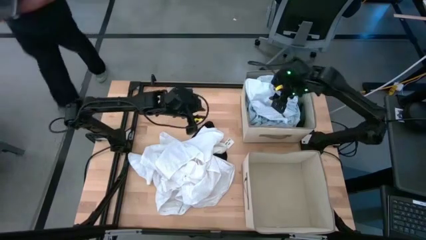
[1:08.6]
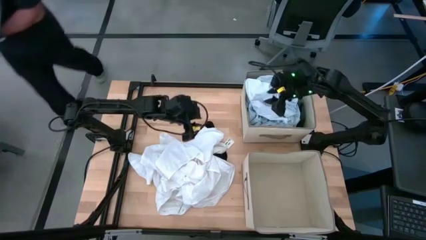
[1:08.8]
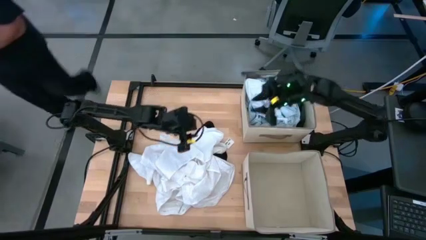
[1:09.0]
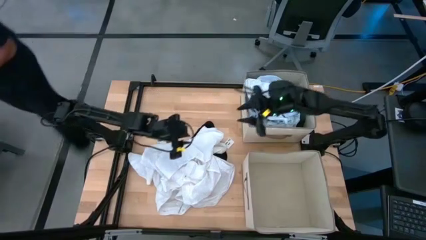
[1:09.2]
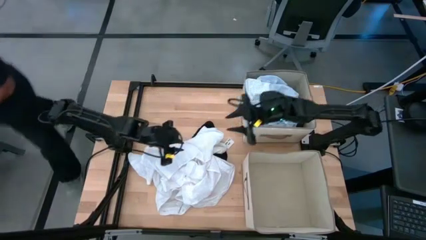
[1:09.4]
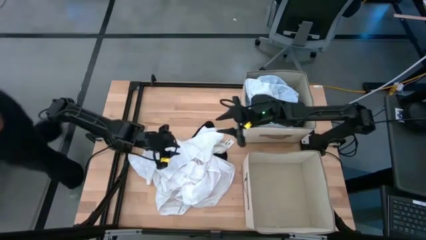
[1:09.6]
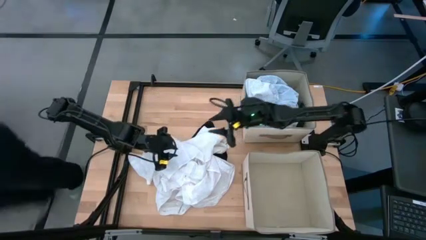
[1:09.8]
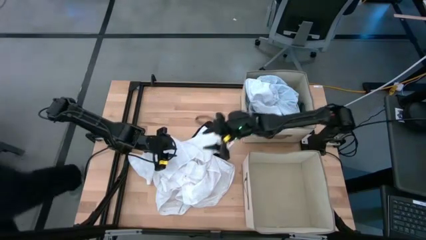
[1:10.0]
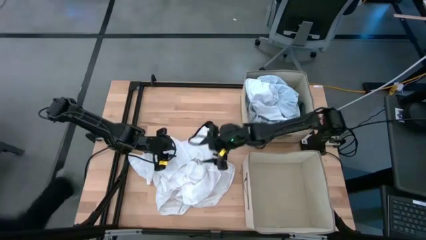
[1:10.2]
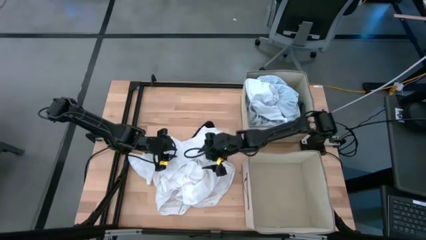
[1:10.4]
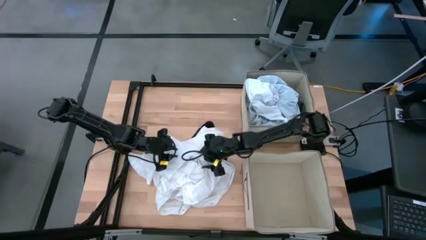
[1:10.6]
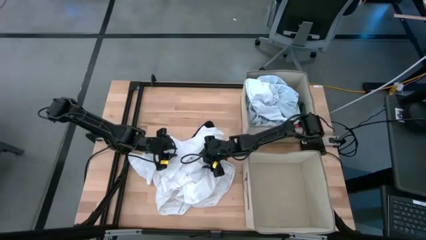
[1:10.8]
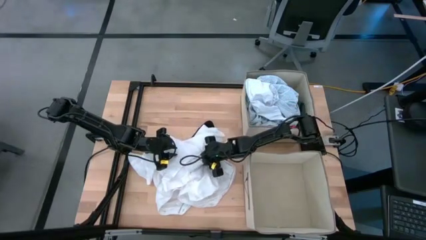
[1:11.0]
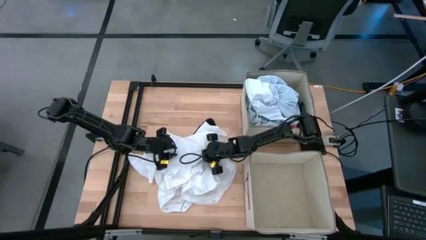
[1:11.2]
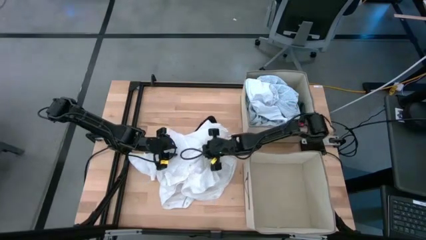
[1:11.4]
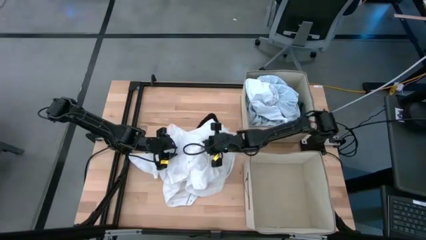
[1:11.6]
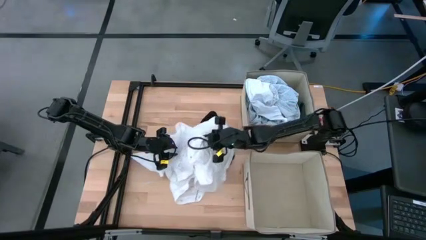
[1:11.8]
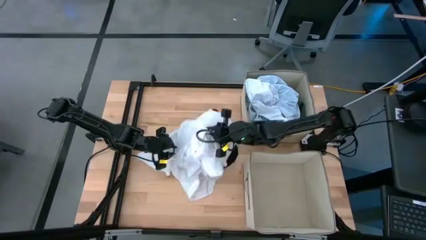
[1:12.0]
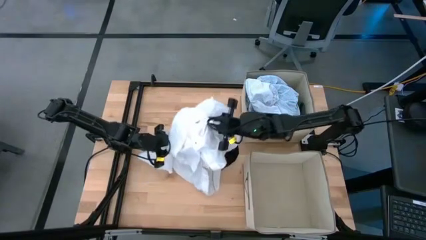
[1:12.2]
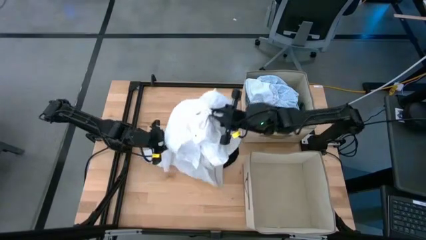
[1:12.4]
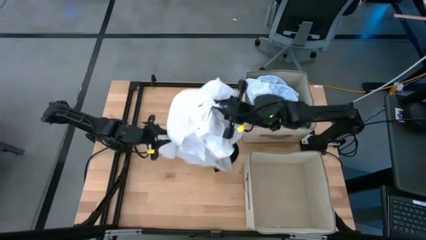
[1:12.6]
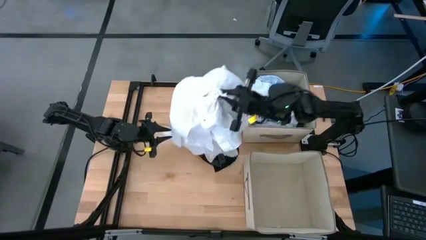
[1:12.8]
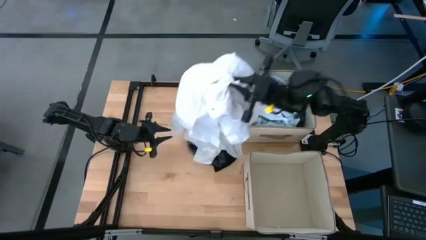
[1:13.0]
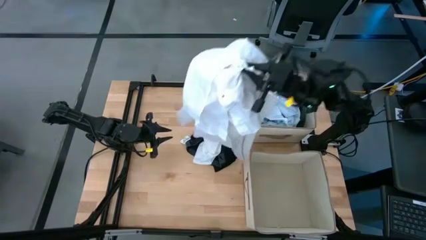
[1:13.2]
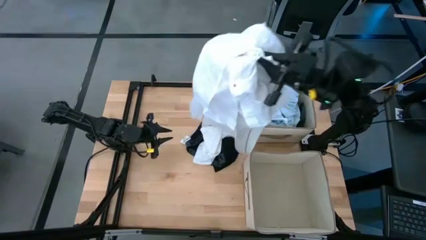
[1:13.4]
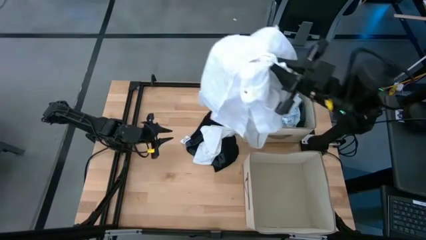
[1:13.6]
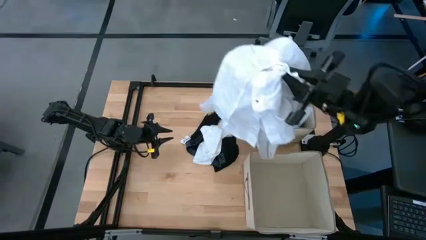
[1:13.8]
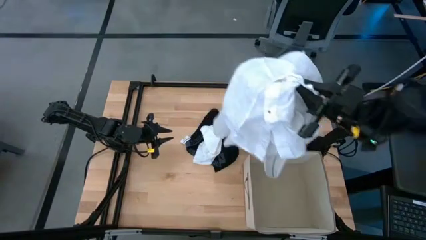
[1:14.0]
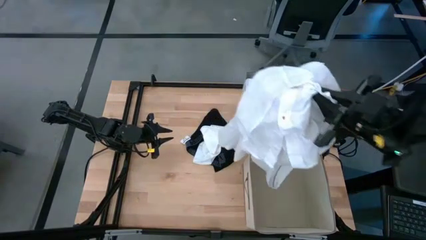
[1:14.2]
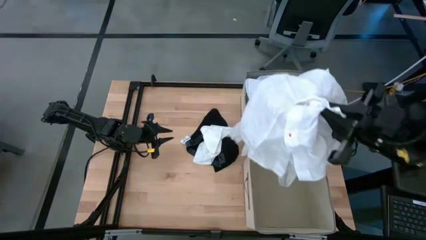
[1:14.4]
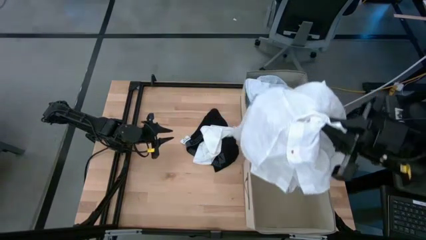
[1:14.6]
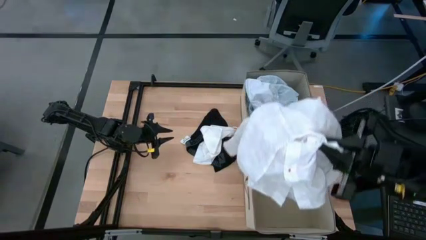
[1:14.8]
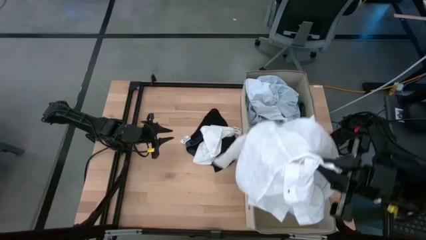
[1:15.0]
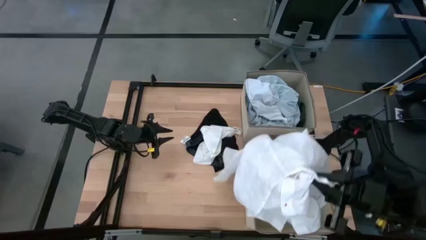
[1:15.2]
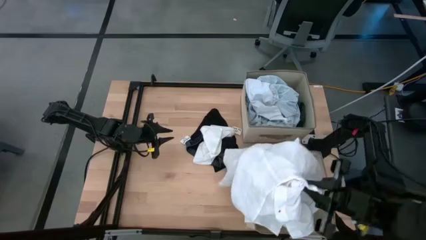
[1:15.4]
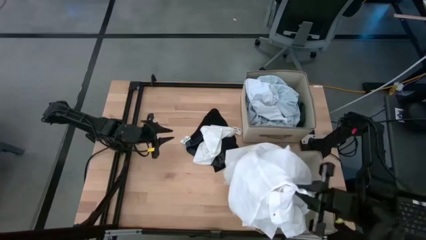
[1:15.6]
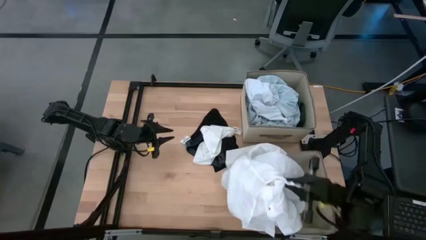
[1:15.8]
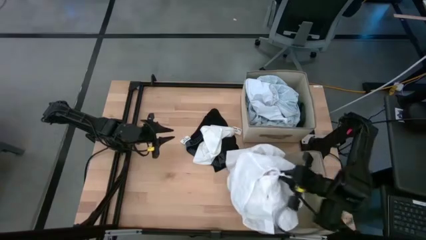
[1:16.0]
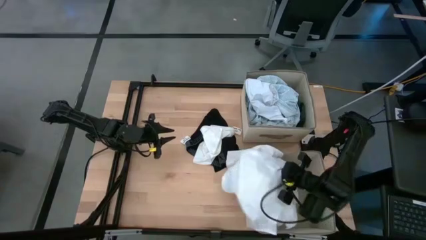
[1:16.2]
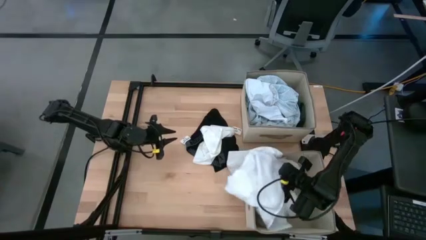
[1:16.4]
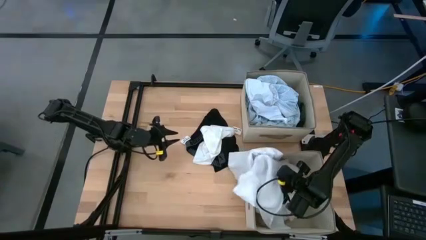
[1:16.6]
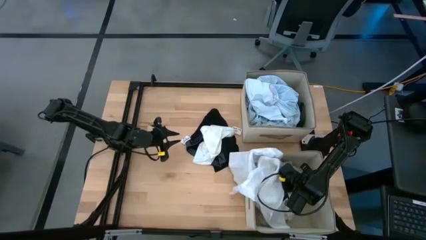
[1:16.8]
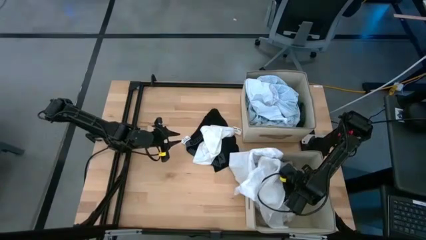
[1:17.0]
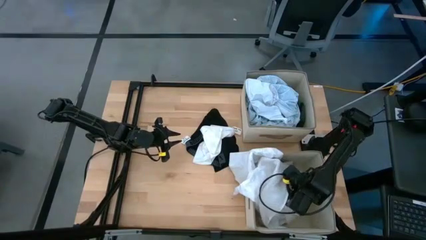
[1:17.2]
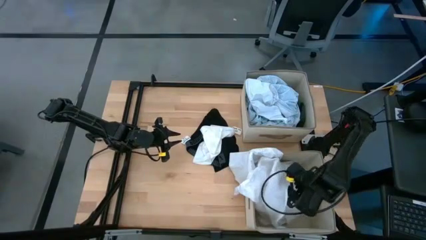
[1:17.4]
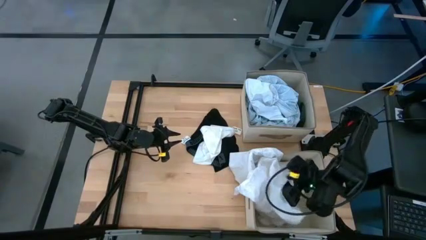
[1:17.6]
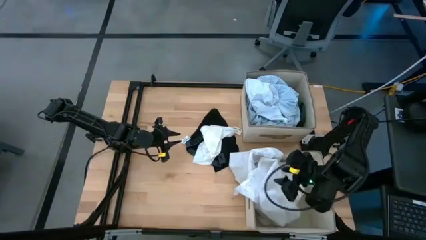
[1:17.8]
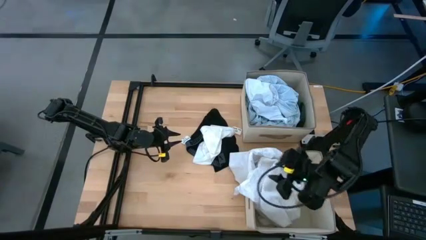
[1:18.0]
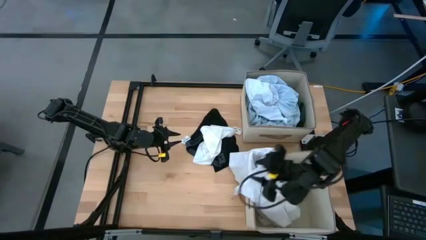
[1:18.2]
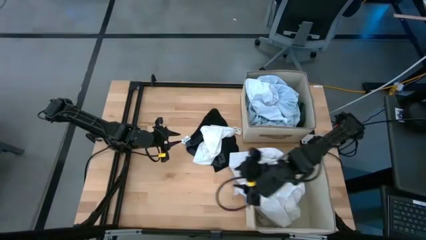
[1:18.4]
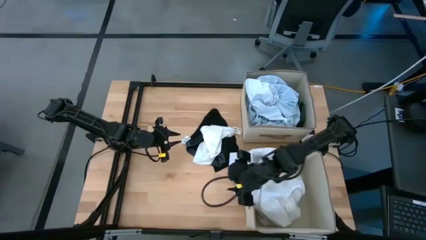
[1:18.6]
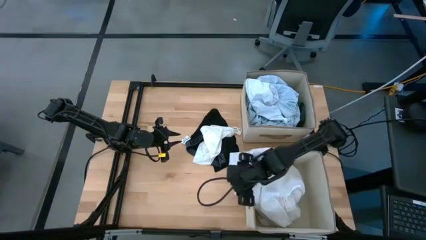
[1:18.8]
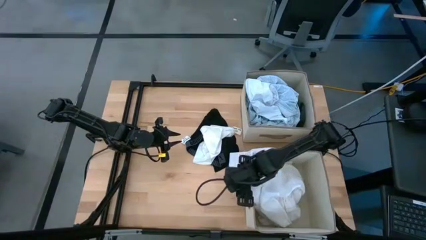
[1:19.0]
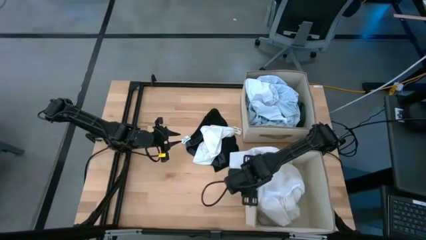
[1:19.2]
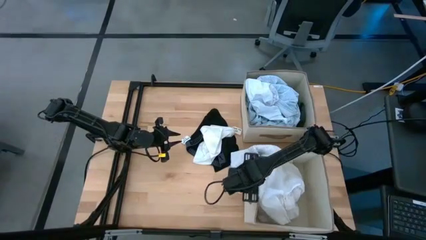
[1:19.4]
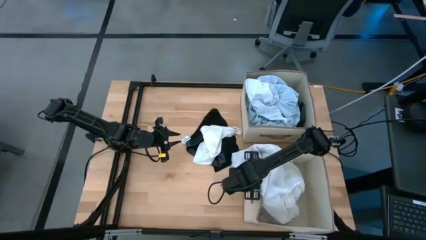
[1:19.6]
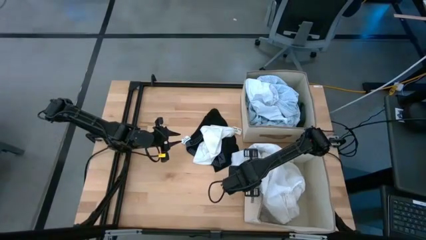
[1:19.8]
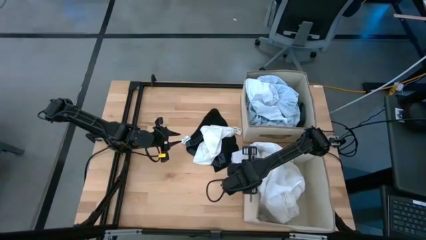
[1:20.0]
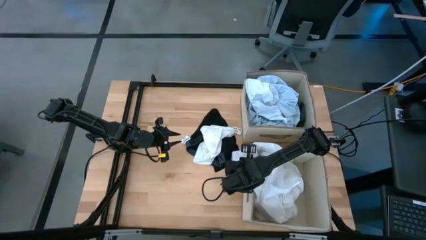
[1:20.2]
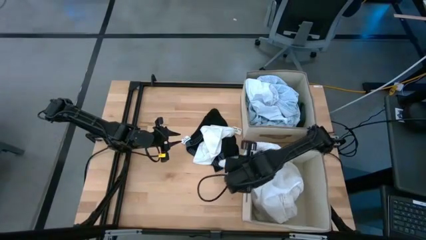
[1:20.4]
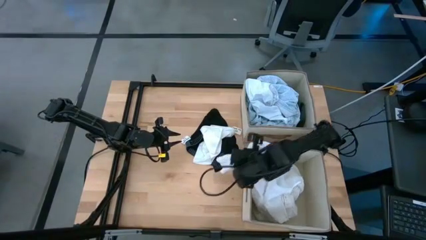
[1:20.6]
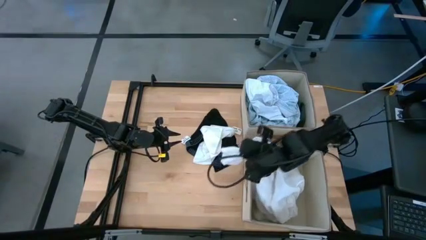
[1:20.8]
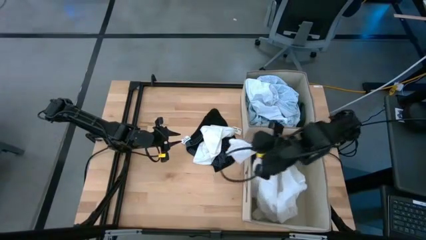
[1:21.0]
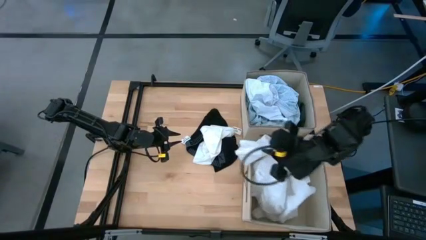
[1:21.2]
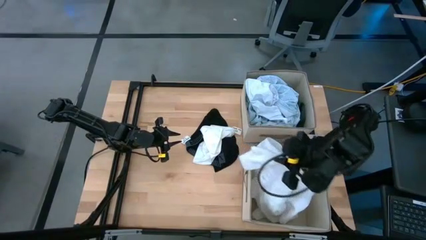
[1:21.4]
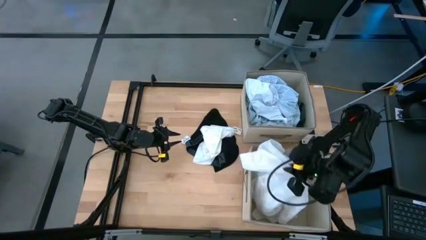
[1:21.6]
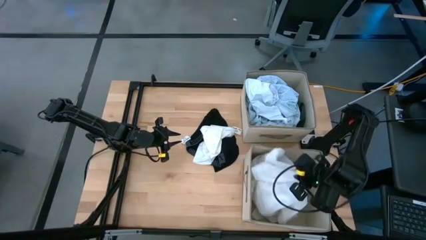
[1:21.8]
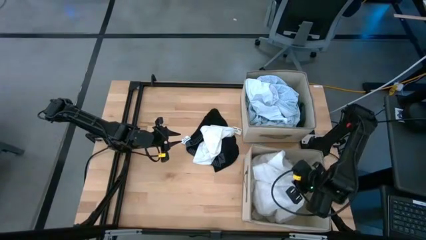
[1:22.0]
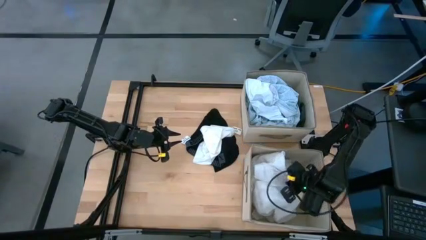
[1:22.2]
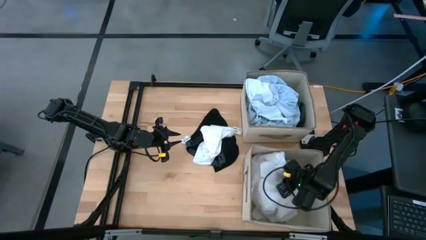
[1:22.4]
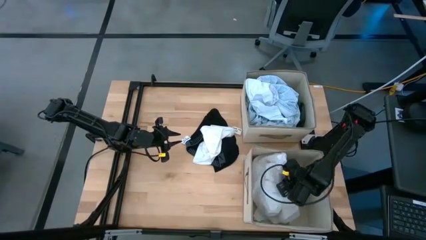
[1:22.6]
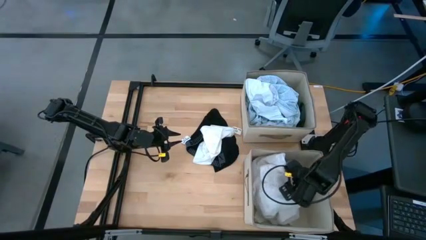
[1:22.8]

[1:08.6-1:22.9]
Task: Sort clothes
Put the white polo into the bottom bin
